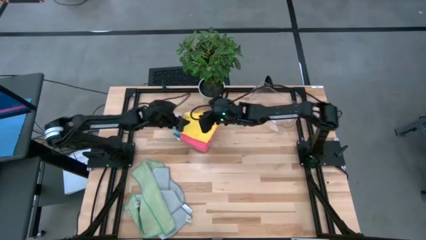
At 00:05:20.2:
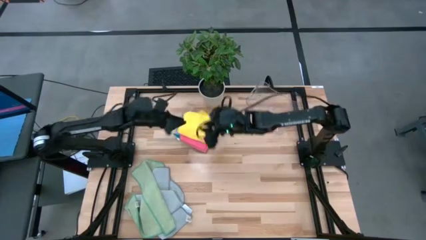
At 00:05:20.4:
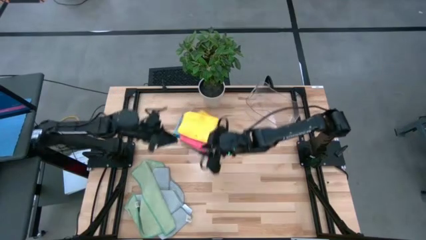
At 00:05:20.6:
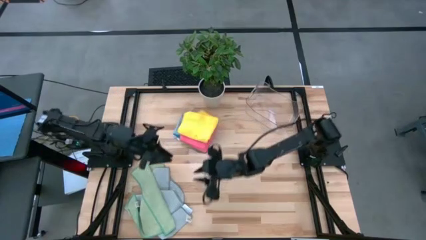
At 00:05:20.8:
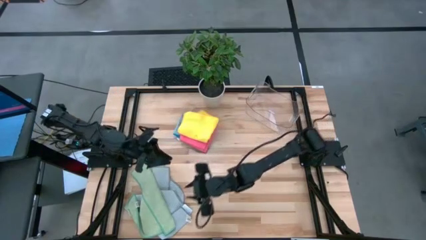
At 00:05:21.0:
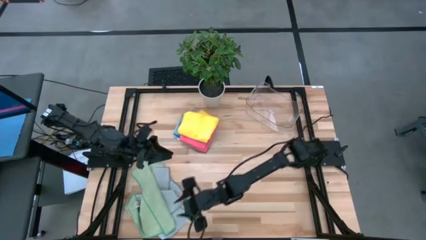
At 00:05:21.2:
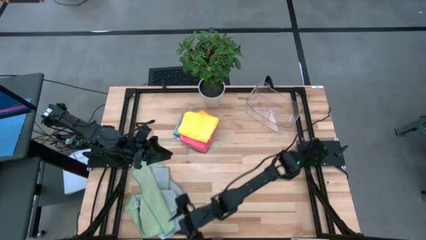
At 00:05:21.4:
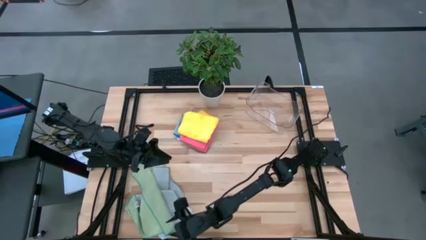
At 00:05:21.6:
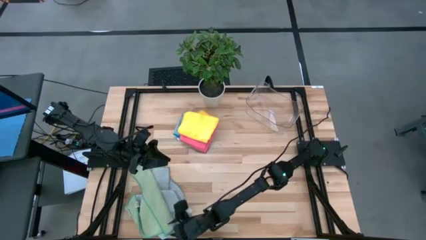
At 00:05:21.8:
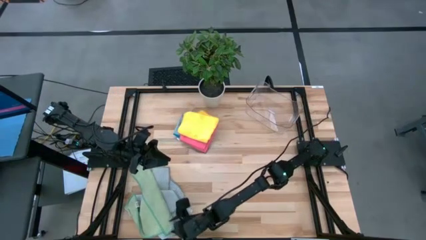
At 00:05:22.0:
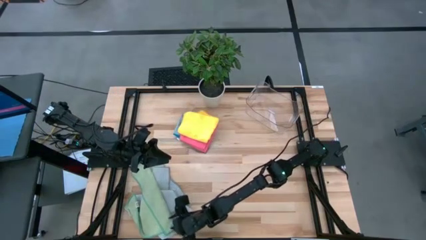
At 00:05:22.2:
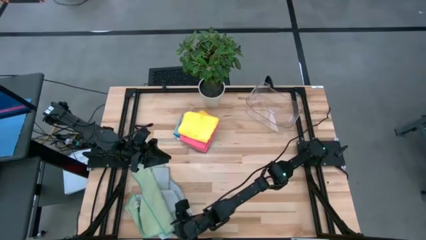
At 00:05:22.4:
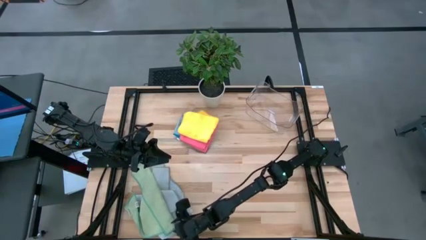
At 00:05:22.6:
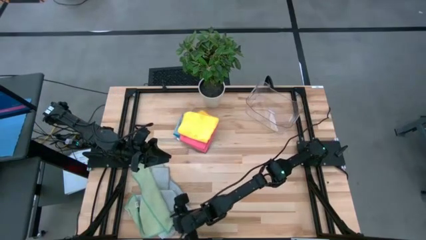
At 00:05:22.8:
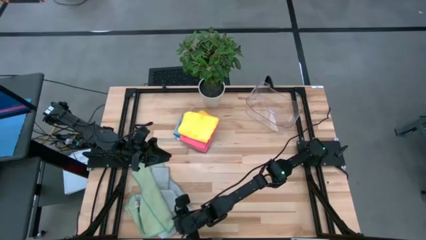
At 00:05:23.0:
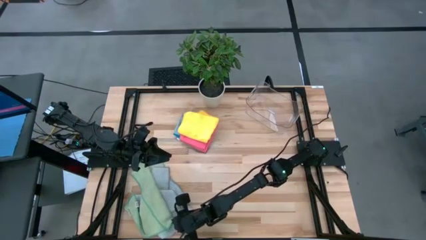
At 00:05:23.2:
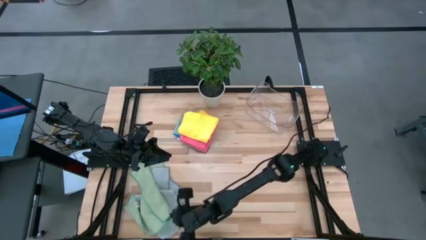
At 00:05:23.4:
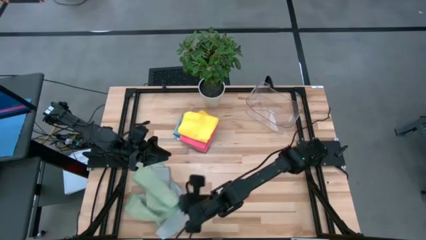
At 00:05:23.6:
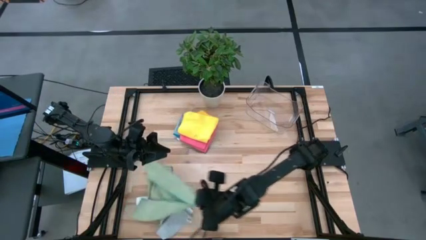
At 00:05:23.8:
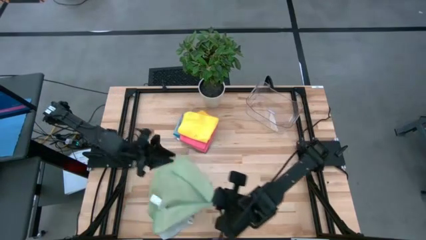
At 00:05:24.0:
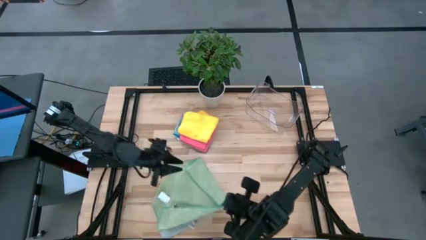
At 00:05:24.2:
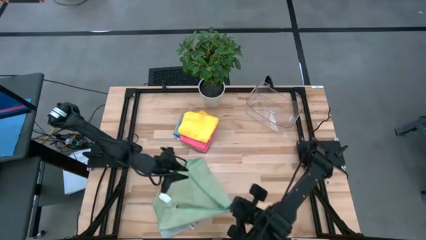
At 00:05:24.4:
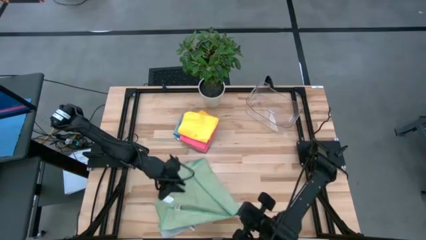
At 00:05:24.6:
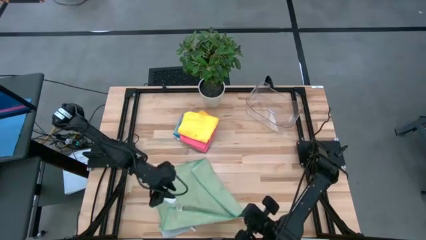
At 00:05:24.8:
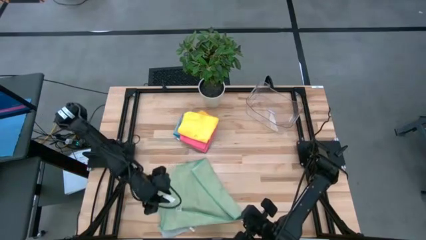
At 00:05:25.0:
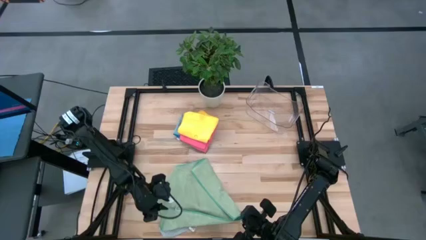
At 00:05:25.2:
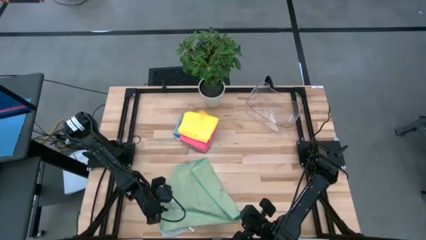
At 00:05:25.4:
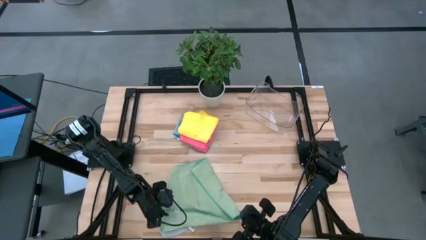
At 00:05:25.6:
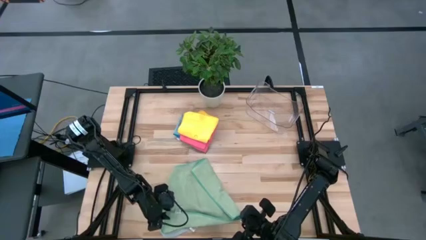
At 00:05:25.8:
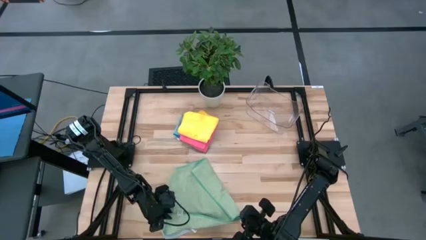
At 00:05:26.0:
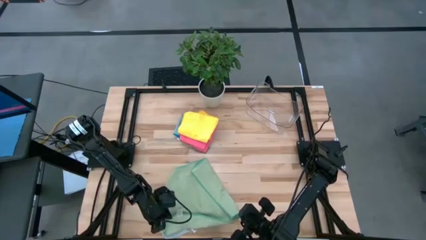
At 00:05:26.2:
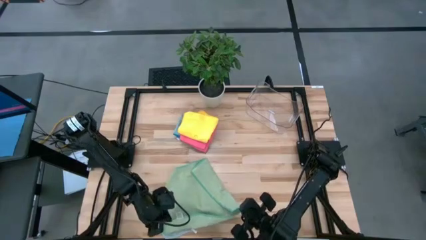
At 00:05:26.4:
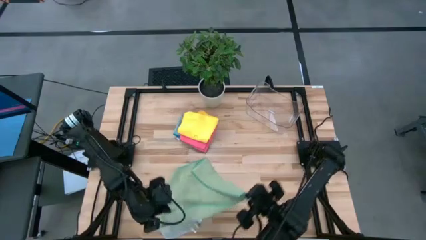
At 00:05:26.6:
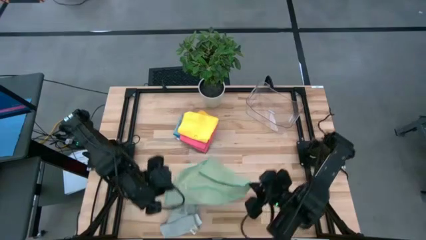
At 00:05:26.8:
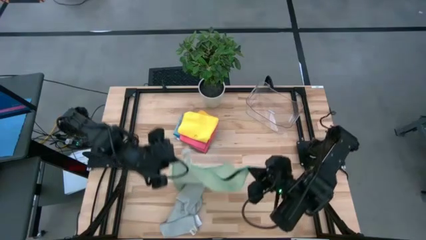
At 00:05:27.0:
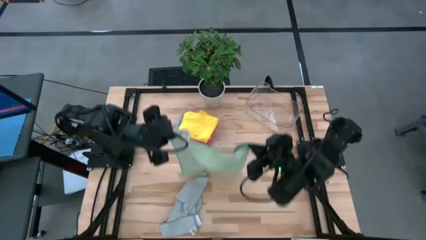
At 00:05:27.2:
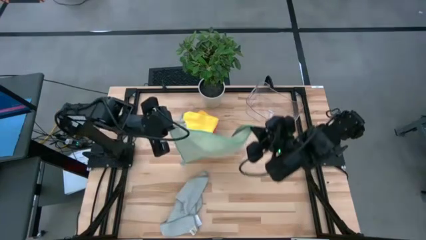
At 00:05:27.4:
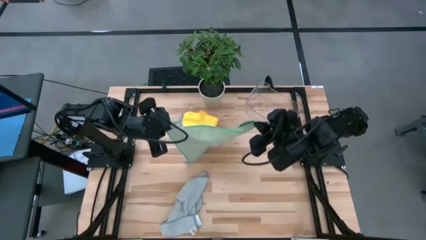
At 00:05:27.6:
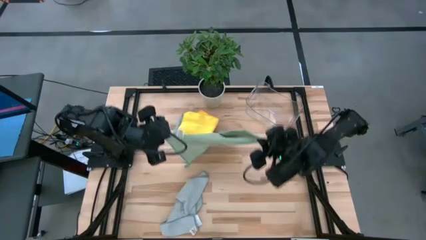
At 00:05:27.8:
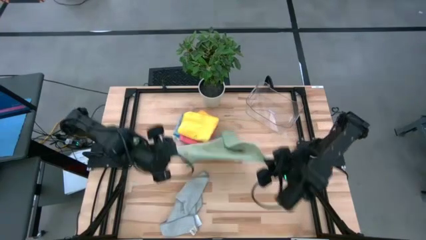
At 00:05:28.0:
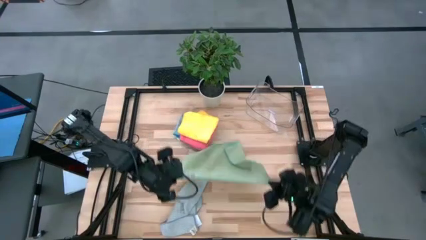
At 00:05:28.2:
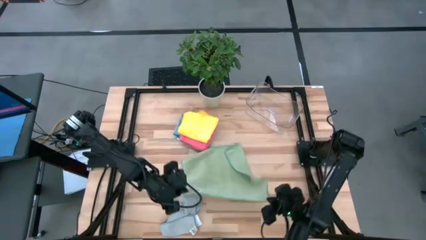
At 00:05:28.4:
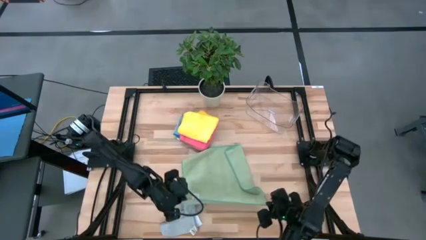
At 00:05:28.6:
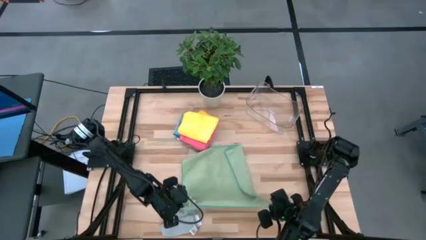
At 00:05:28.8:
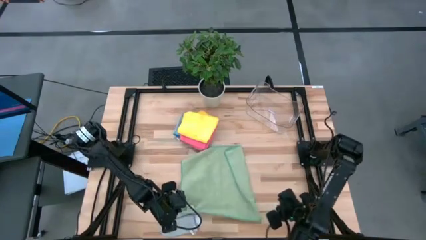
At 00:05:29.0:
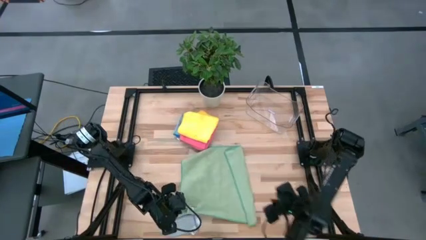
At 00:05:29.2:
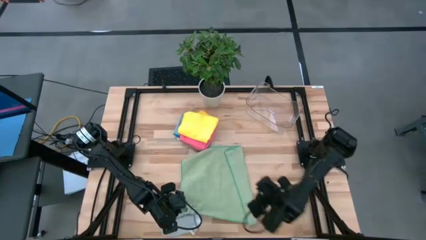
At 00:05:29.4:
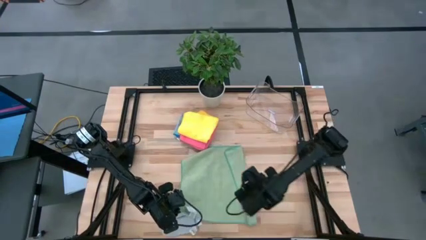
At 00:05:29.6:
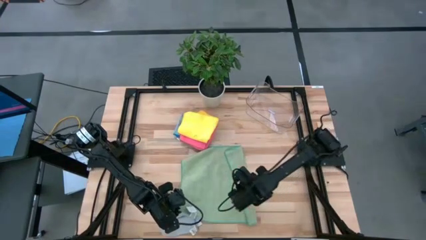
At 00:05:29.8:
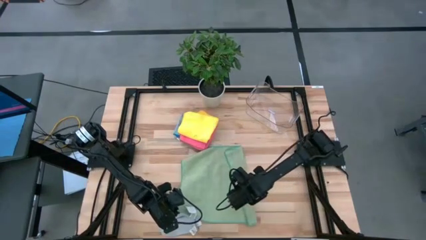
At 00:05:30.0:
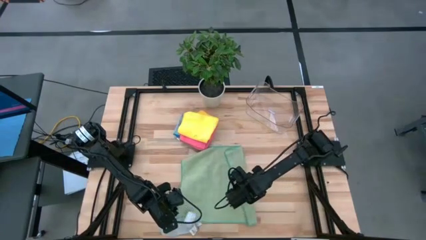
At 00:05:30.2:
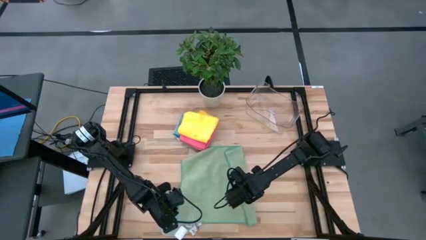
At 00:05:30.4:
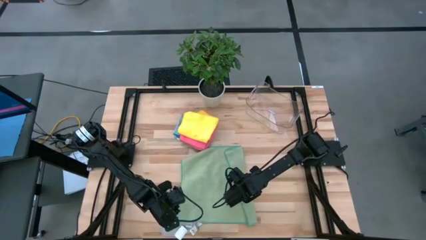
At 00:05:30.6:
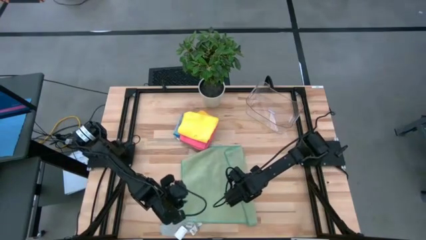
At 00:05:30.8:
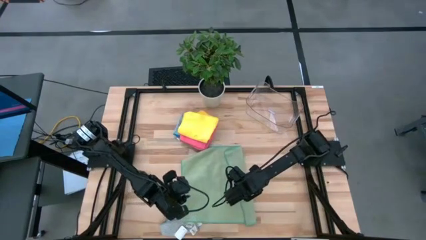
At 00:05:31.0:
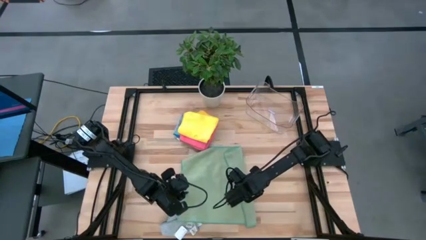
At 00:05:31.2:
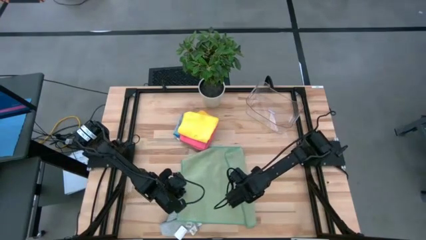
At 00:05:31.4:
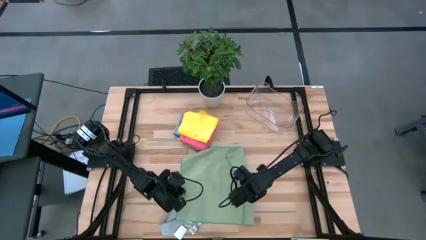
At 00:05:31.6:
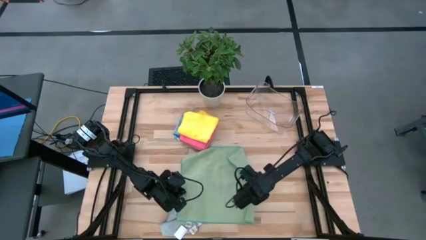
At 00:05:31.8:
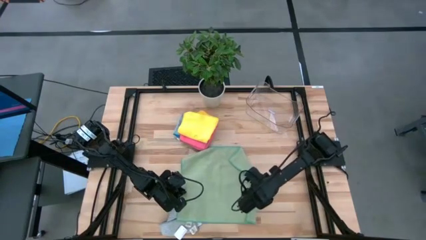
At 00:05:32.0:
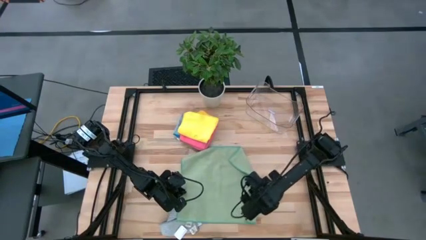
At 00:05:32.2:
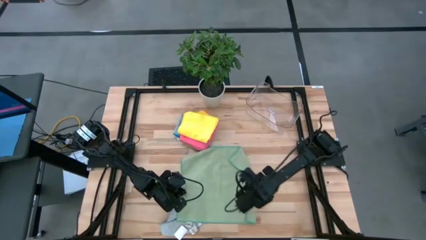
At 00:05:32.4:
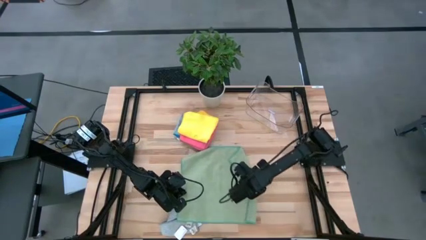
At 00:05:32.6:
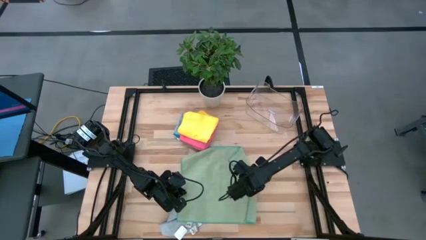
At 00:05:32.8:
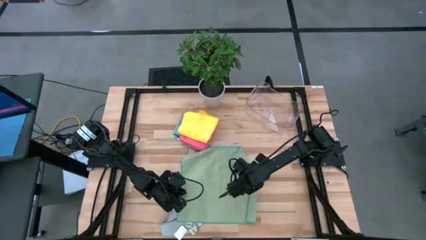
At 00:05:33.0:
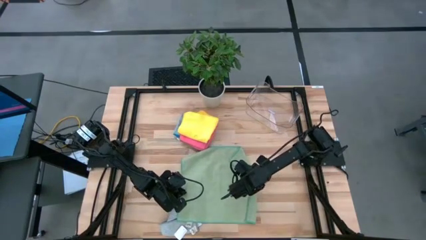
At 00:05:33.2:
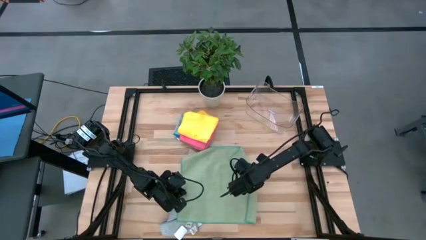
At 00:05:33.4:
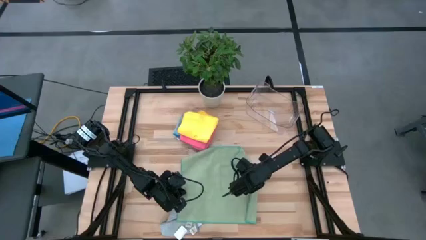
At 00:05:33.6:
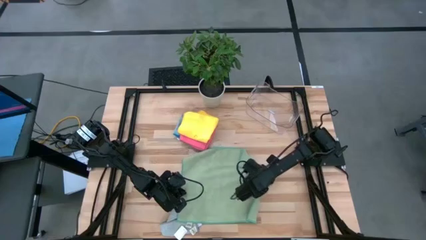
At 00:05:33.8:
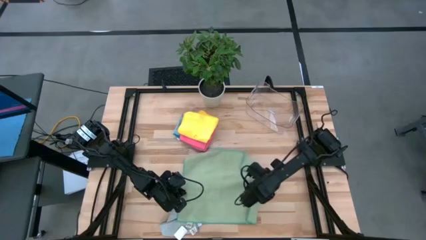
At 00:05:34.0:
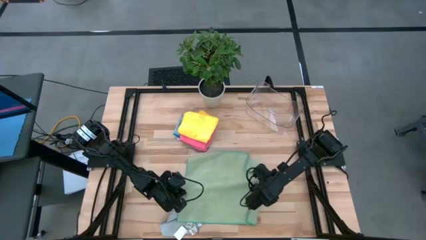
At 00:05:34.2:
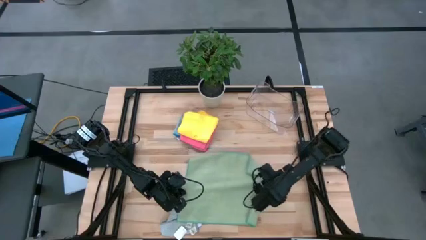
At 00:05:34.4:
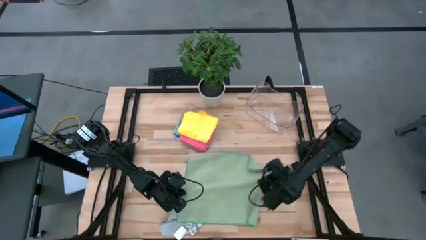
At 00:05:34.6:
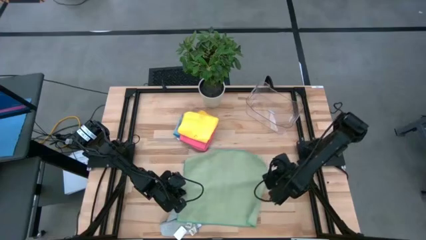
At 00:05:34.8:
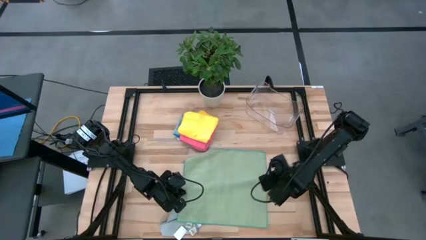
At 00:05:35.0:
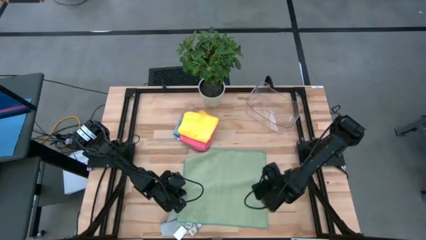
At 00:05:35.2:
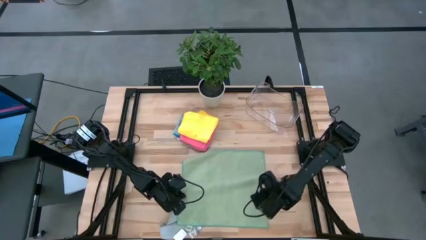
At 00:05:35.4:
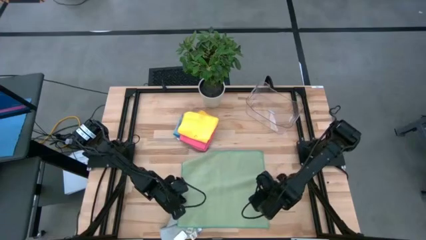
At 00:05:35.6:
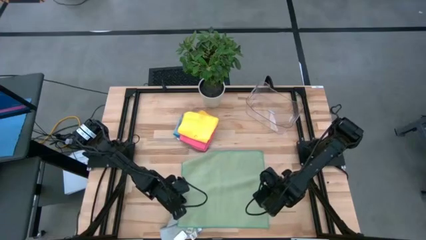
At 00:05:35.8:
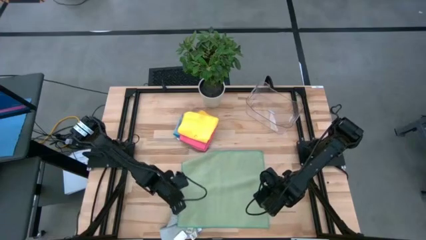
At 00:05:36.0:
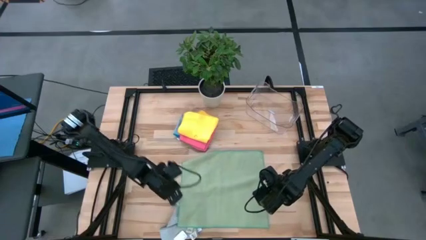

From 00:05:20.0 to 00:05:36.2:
Task: Fold microfiber towels
Fold the light green microfiber towel

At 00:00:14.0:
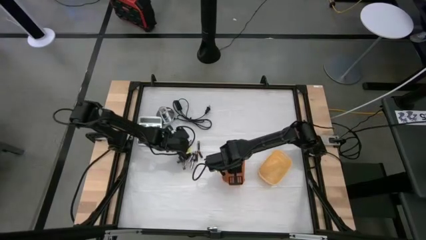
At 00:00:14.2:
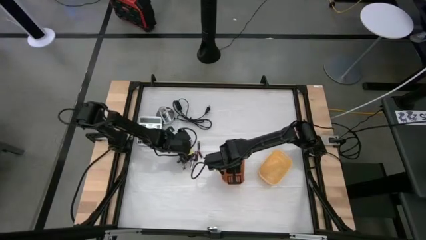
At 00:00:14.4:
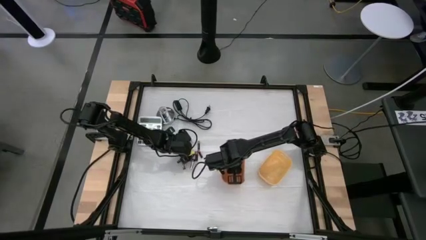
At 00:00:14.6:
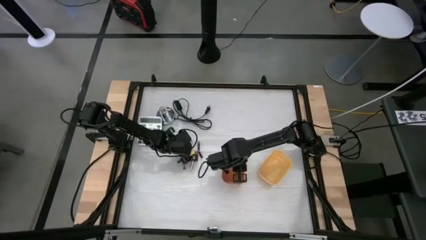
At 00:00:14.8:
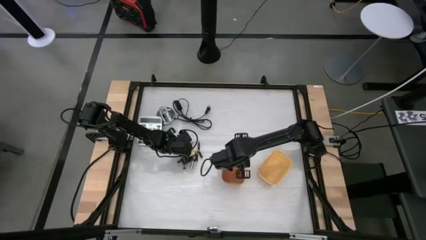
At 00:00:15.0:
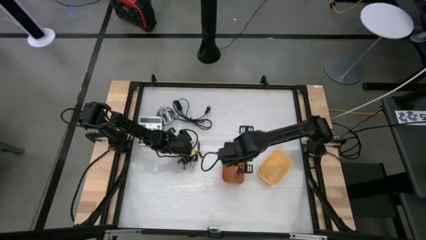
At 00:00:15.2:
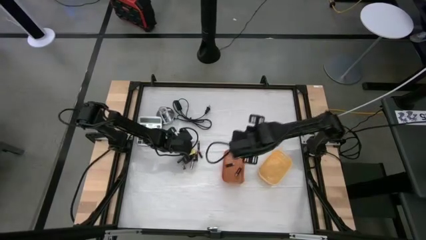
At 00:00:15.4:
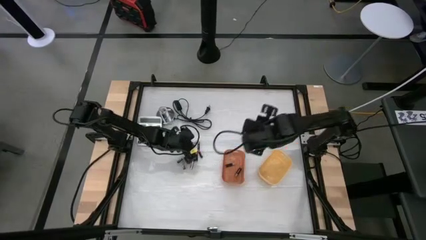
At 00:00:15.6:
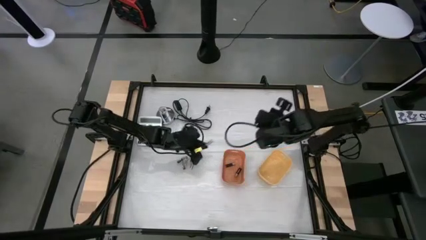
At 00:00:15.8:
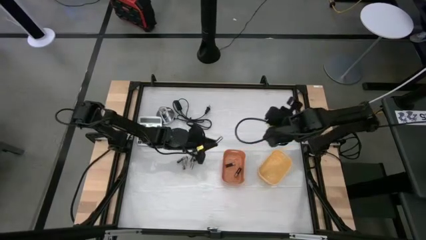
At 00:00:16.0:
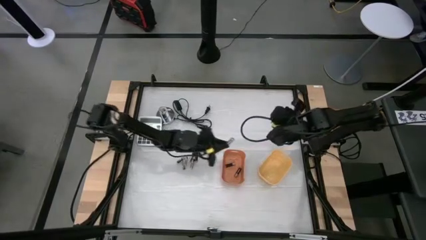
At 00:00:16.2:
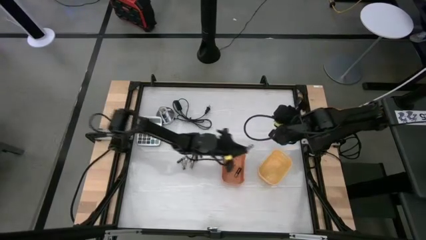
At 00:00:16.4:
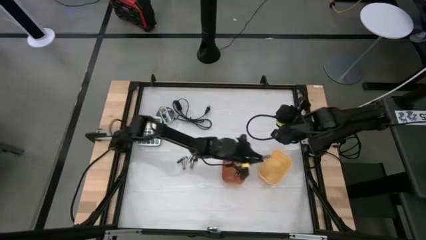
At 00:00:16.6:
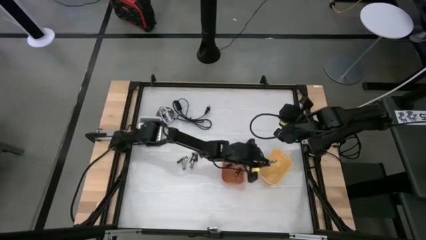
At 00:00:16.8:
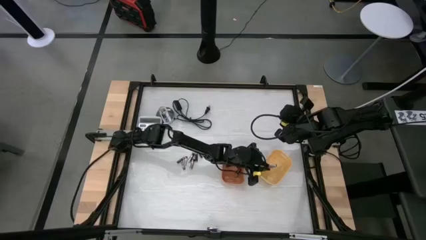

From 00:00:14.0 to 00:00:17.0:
Task: Sort batteries
Put the silver battery into the yellow bin
